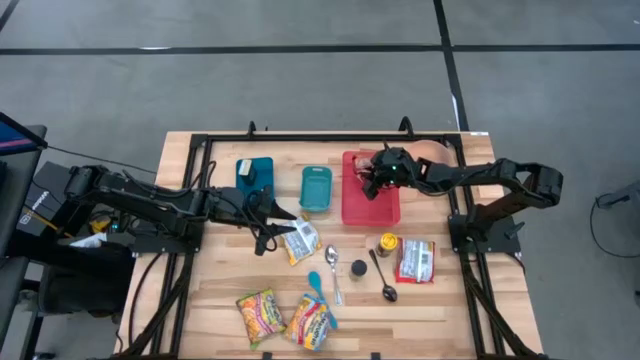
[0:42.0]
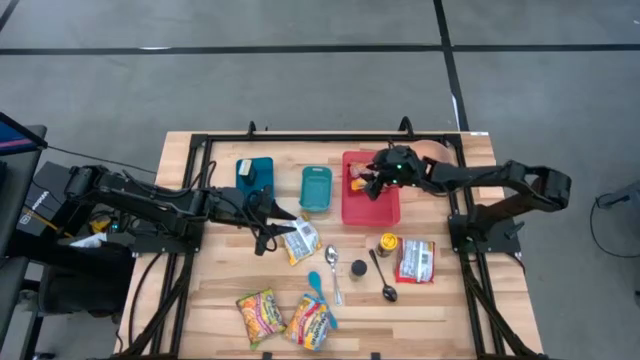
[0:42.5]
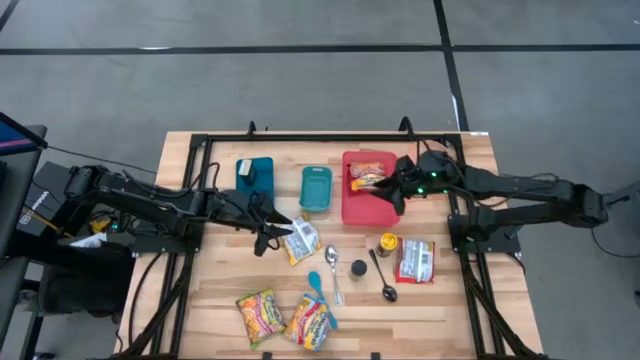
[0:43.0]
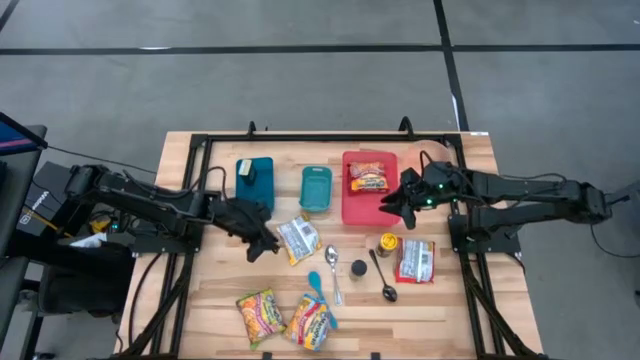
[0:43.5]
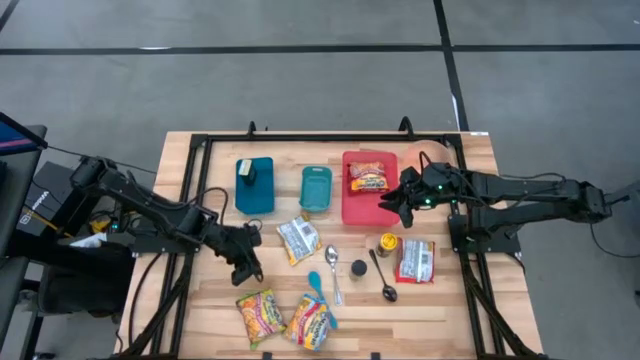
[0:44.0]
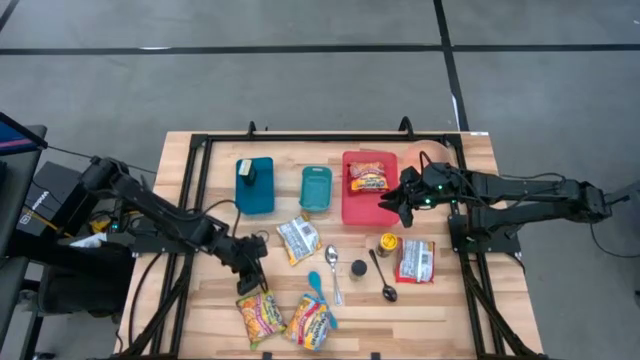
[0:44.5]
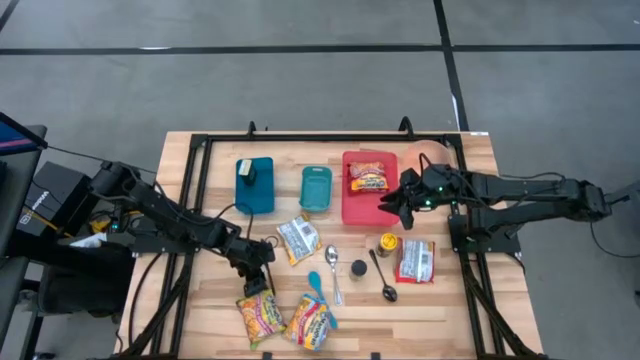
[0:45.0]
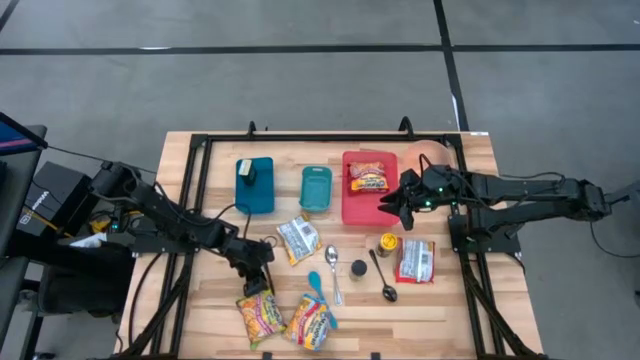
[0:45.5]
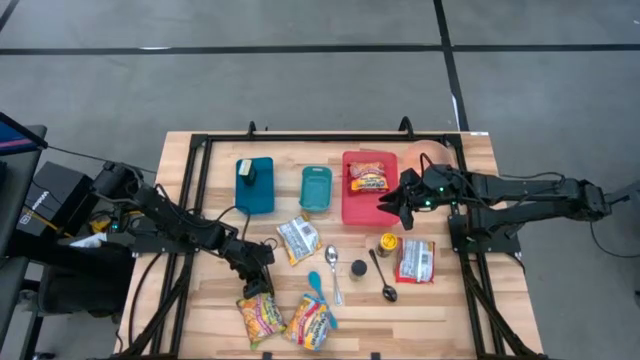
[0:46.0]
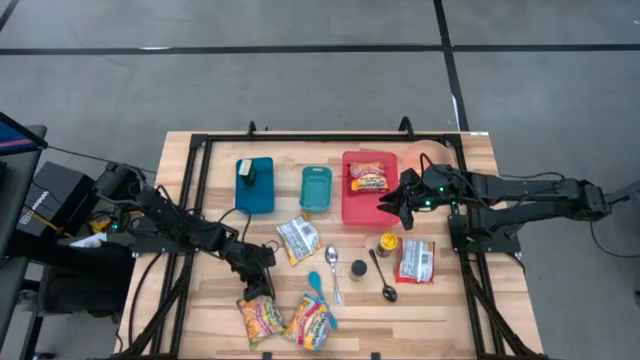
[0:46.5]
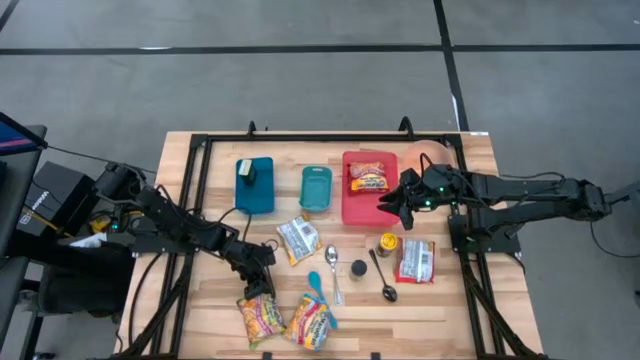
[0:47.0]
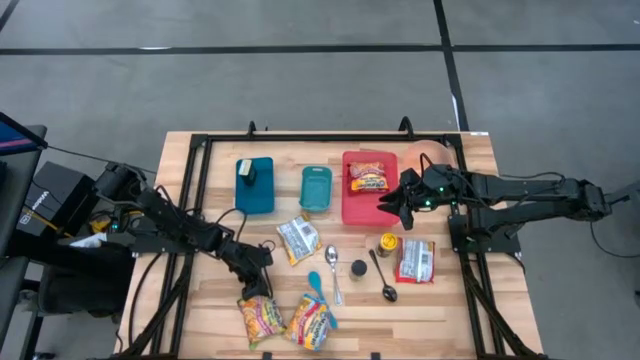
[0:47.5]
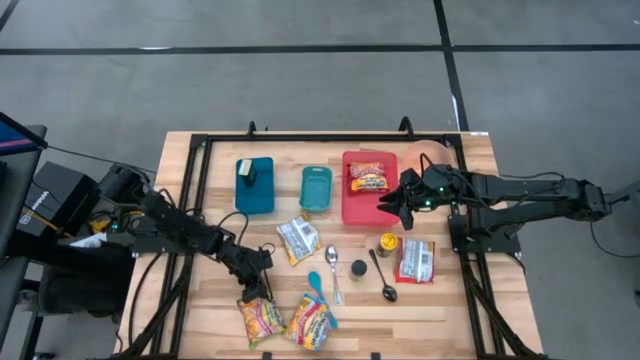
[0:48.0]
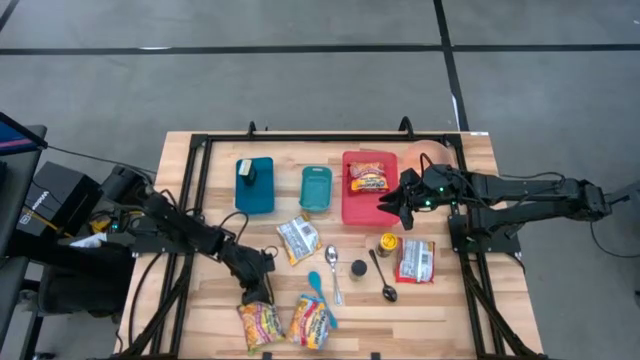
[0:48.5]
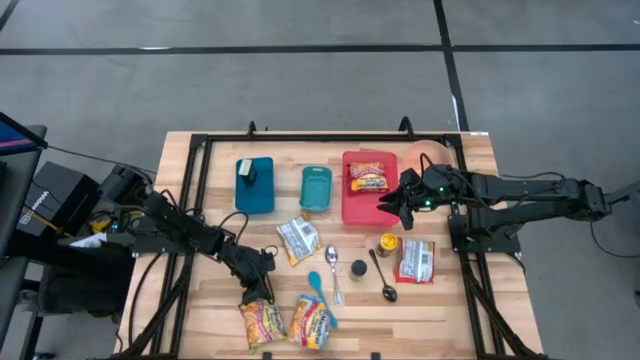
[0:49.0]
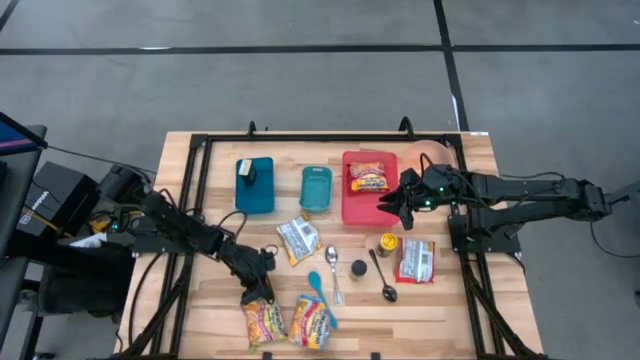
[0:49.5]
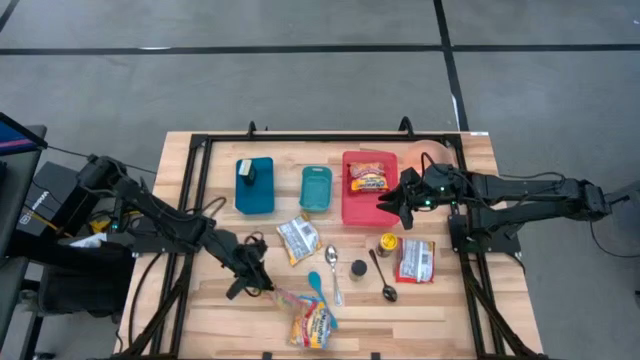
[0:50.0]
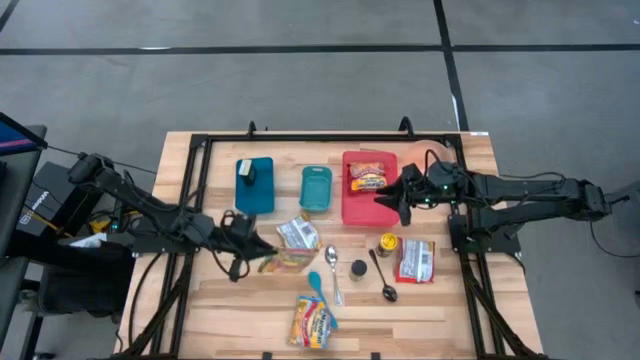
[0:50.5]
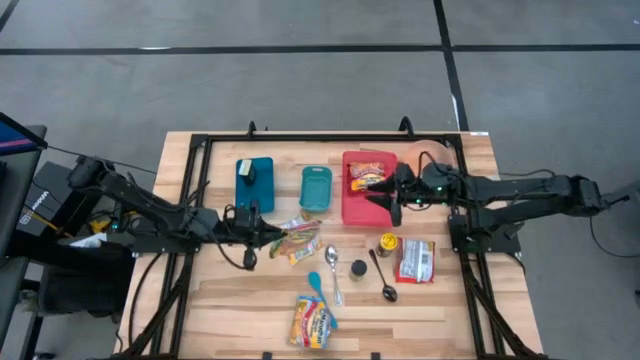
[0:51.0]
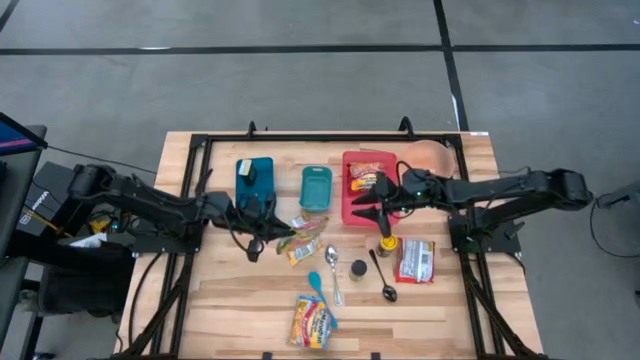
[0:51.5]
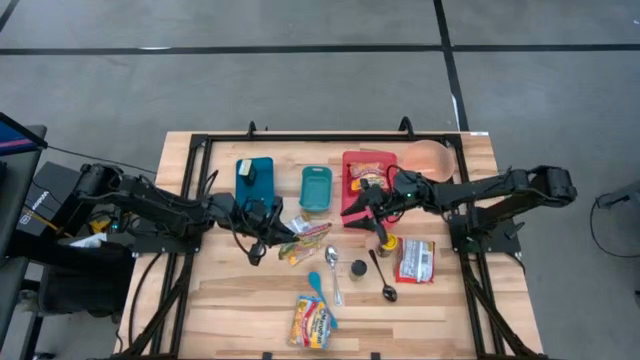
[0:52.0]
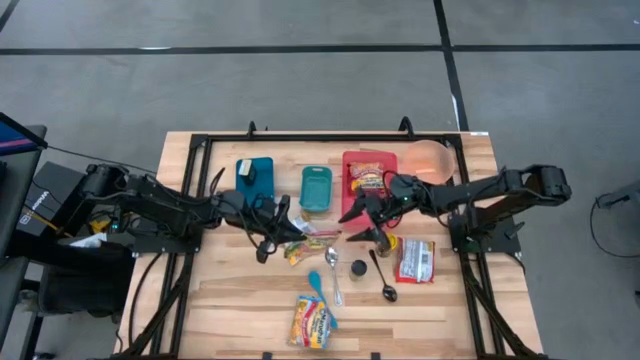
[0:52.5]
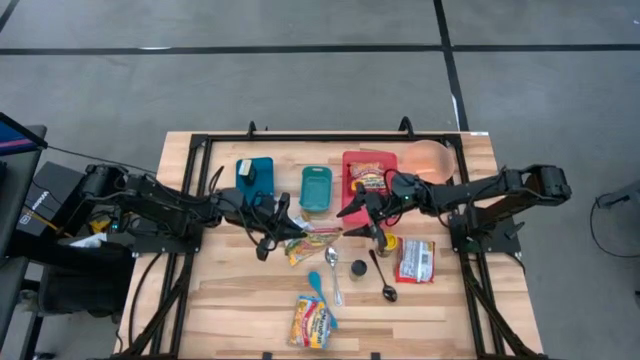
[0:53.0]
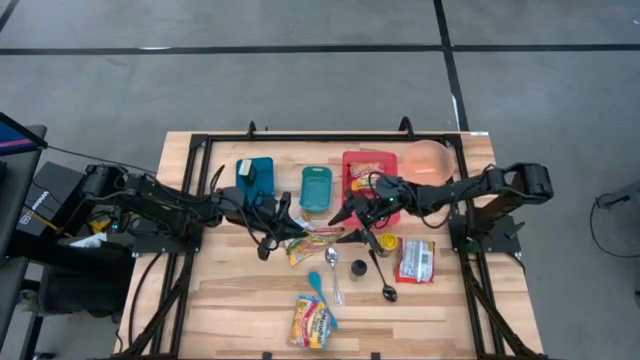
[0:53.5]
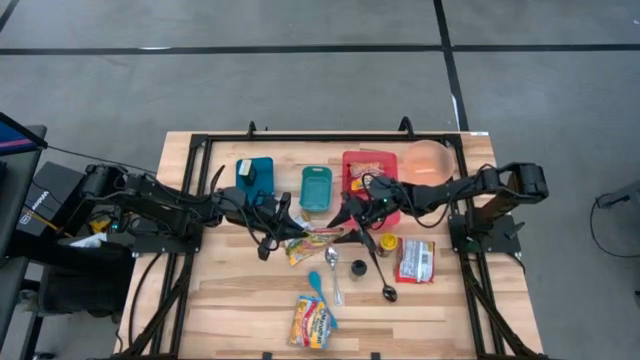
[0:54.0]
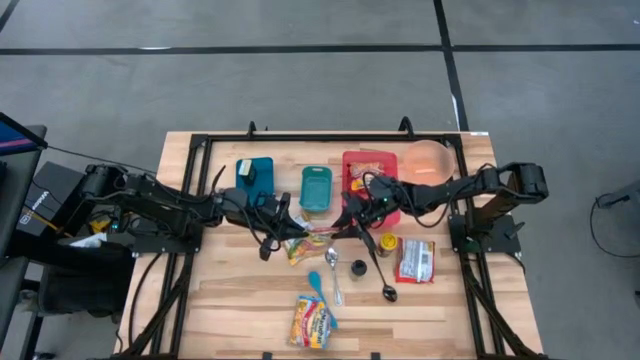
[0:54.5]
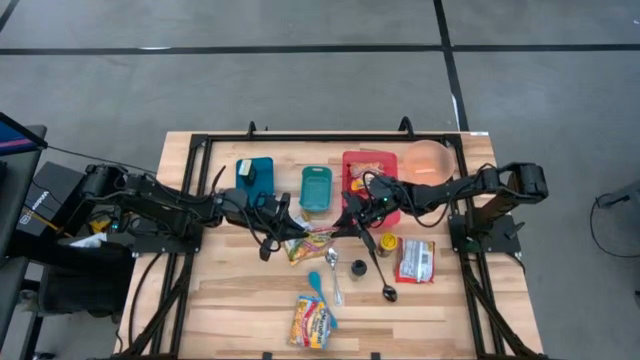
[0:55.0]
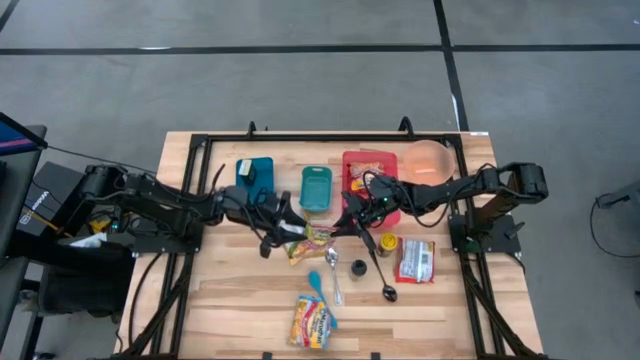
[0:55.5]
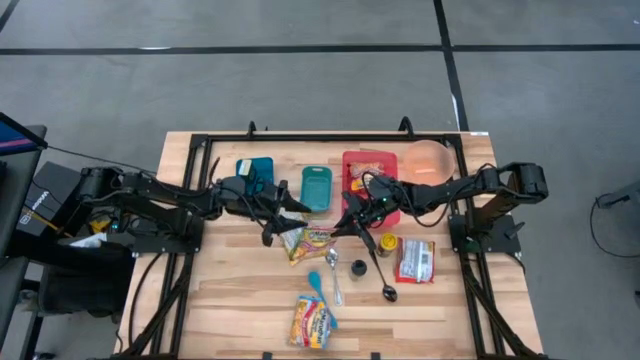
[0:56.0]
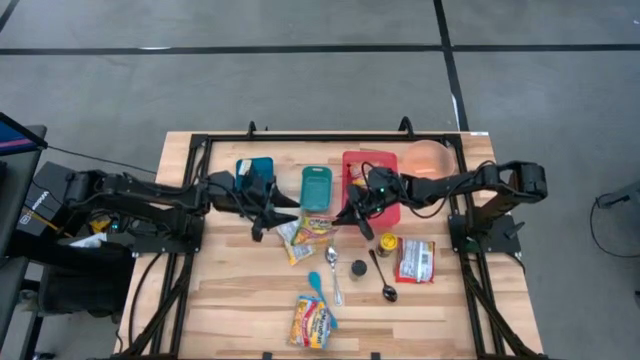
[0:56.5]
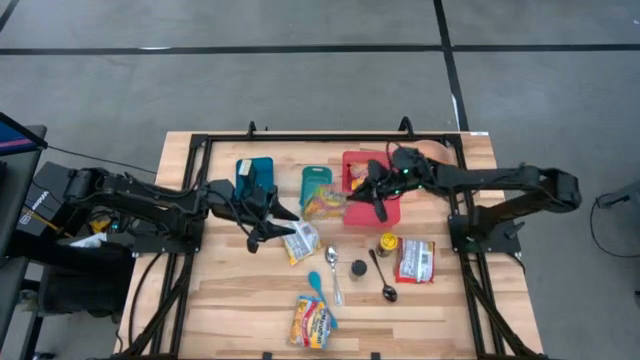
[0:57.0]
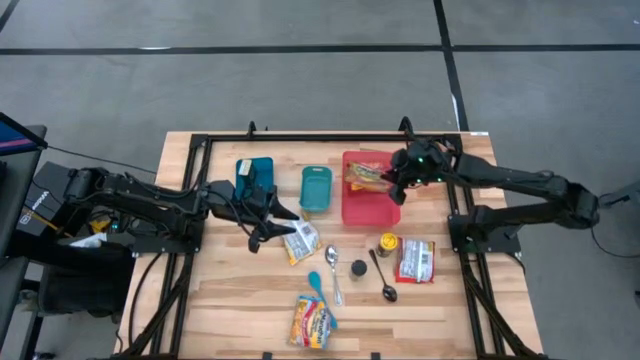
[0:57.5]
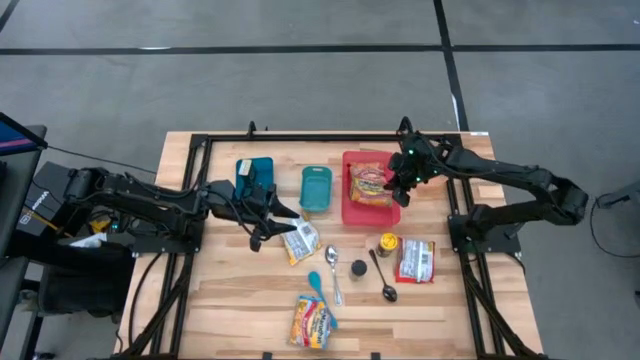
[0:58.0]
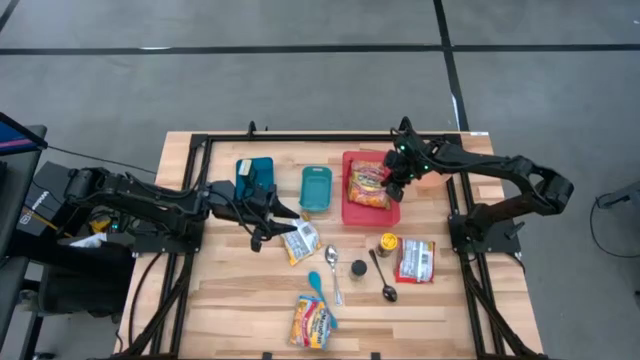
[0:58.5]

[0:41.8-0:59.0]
Task: Pick & Place Food Item
Put the green noodle pack into the red bin
